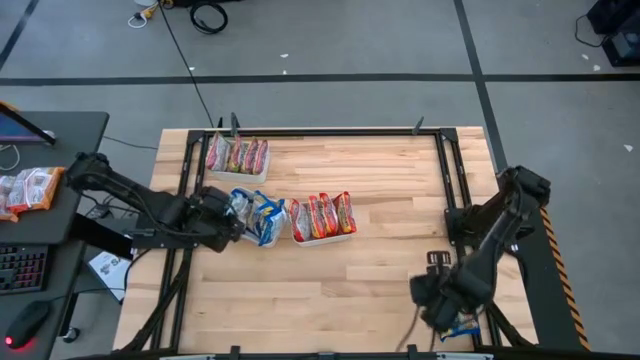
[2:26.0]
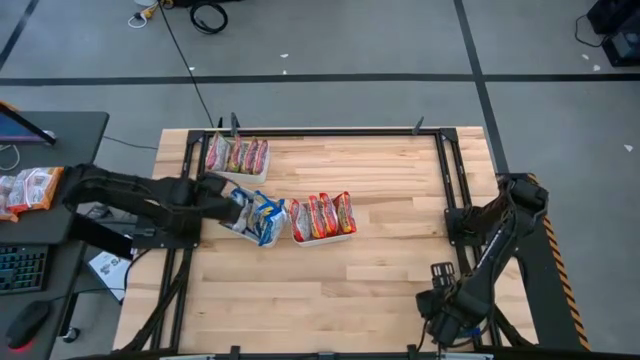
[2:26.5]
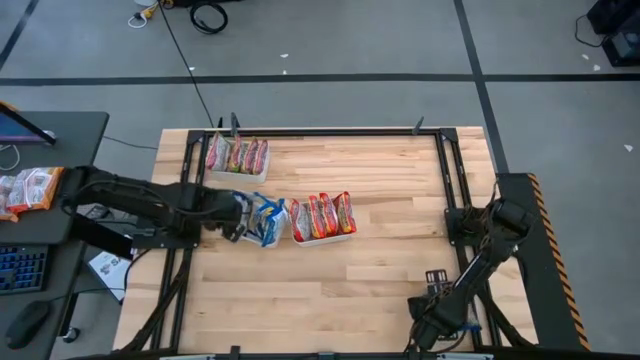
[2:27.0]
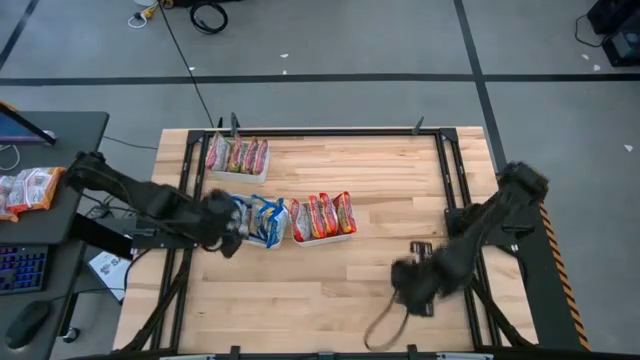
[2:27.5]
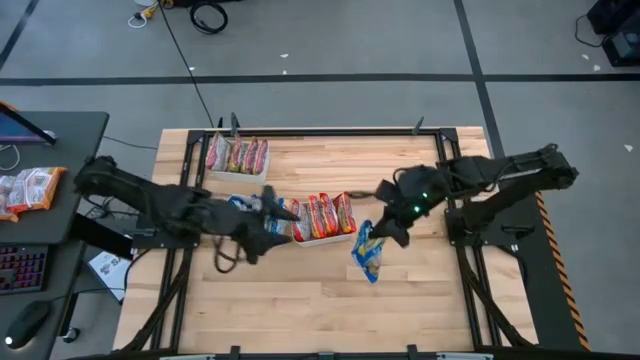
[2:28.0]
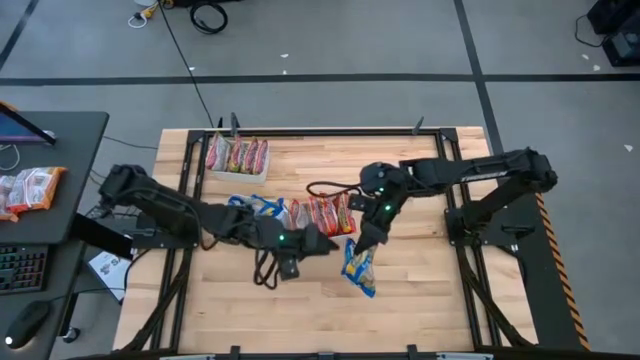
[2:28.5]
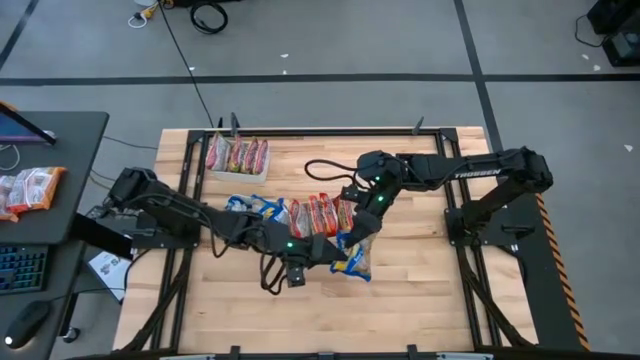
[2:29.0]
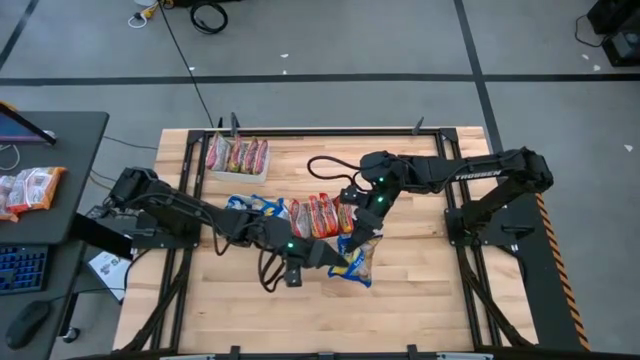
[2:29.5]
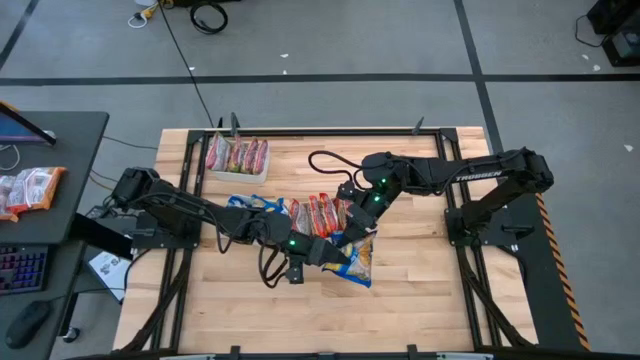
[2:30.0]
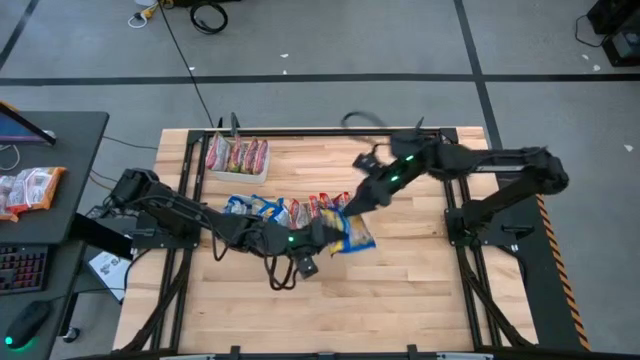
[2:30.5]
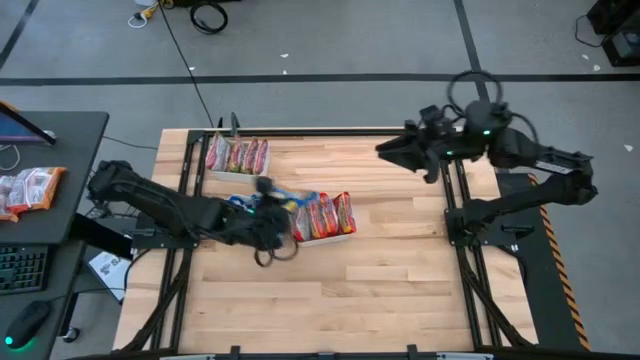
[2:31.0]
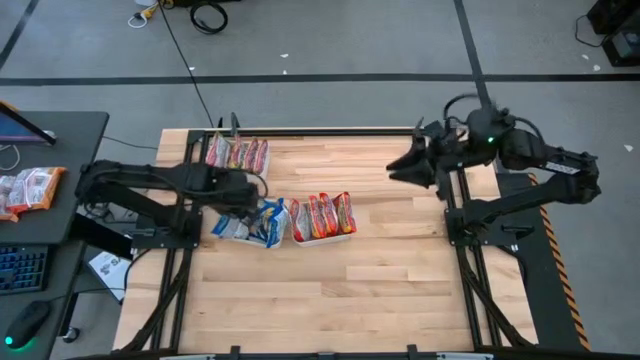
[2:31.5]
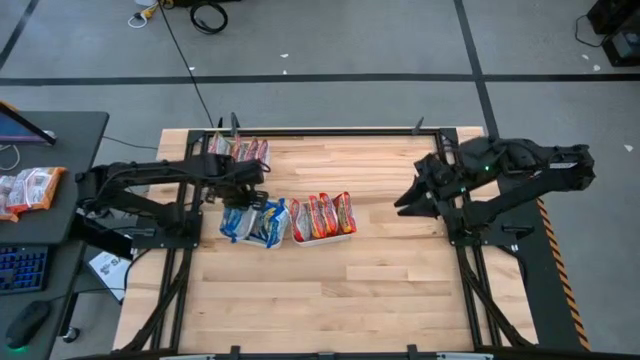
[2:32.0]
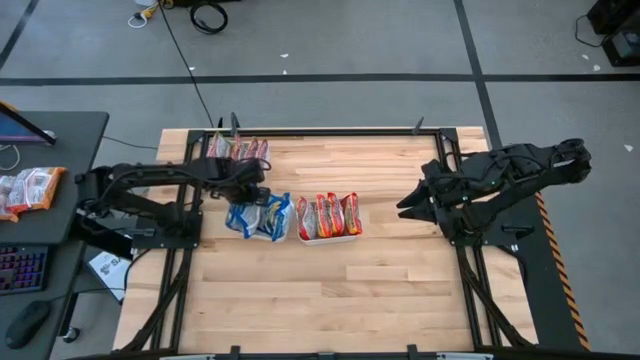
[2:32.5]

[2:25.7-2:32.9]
Task: Sort Maruchan noodles
Put the blue noodle pack into the bottom white bin

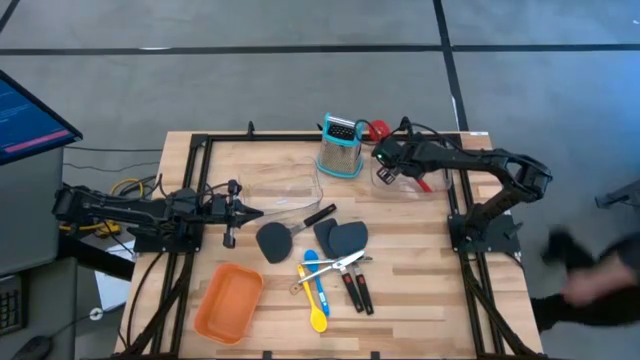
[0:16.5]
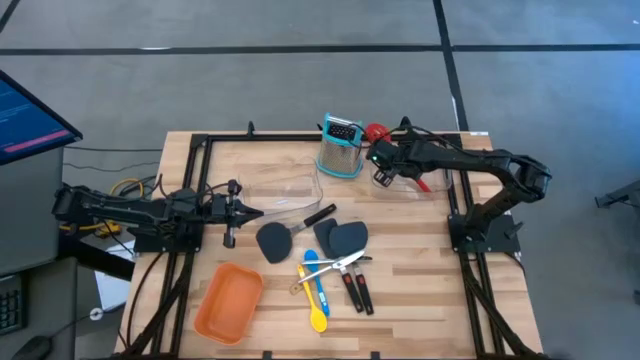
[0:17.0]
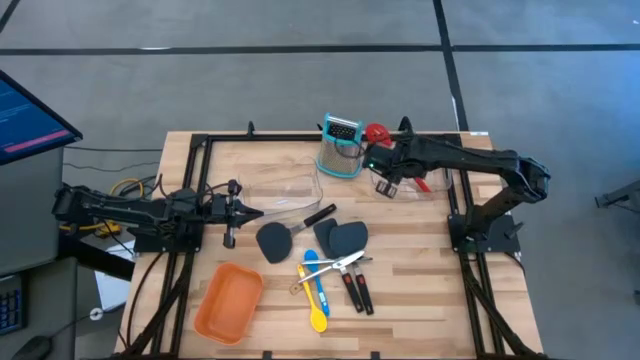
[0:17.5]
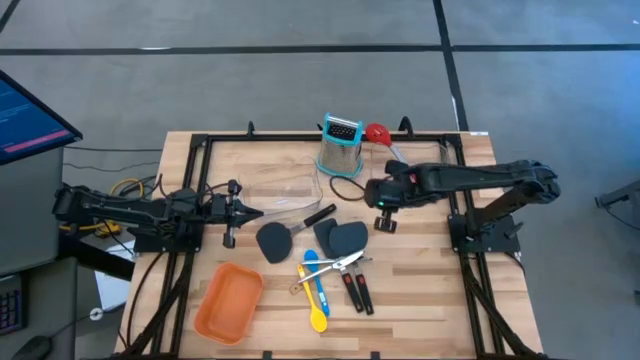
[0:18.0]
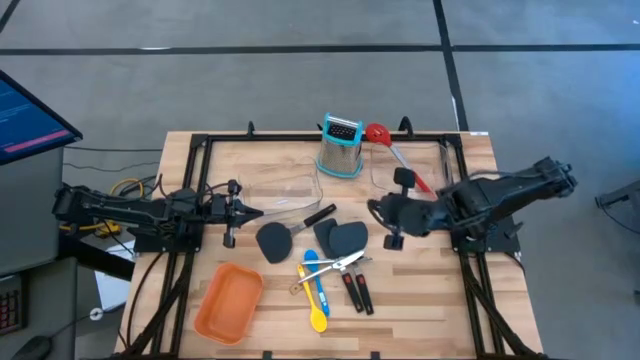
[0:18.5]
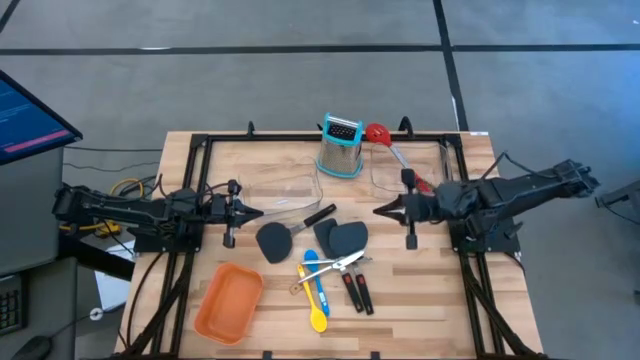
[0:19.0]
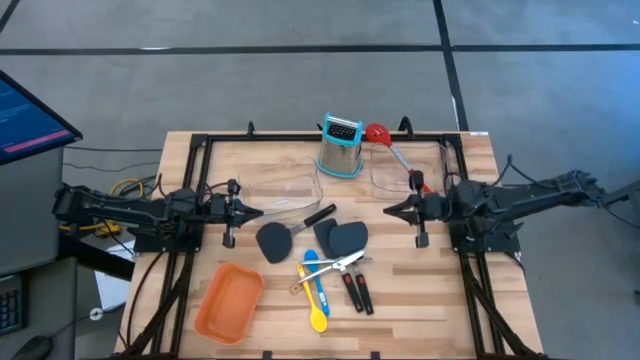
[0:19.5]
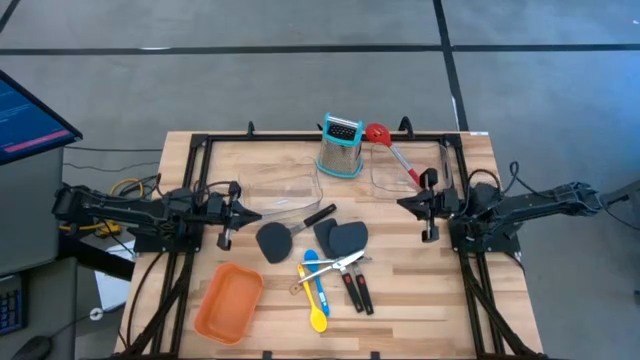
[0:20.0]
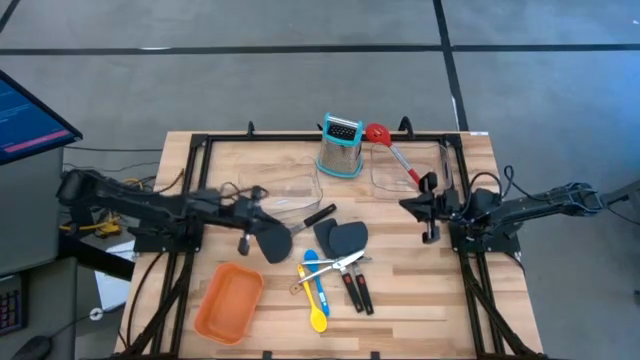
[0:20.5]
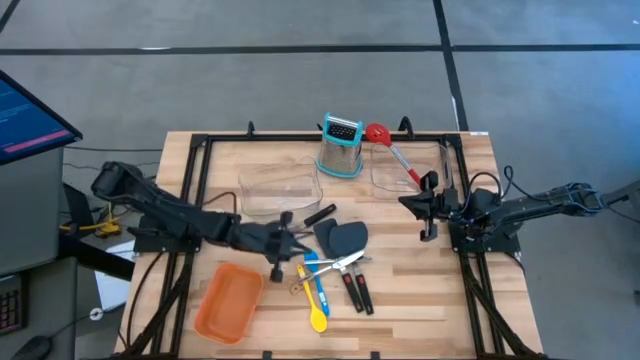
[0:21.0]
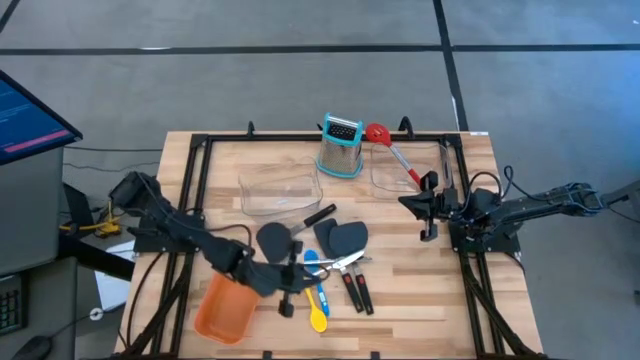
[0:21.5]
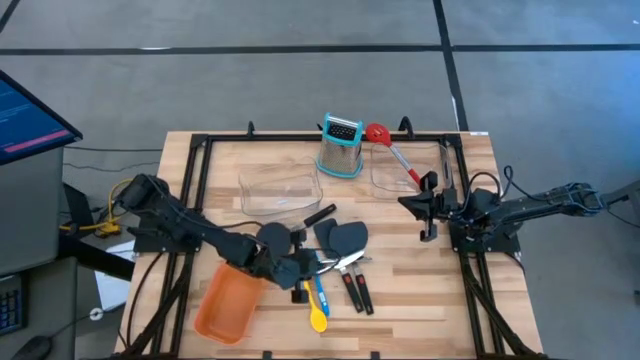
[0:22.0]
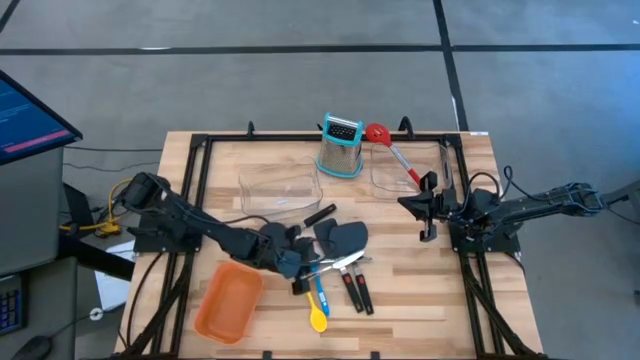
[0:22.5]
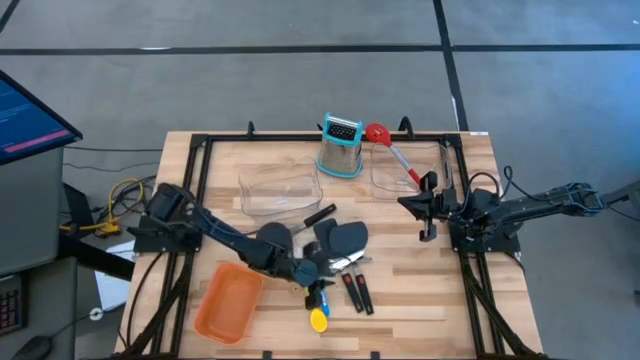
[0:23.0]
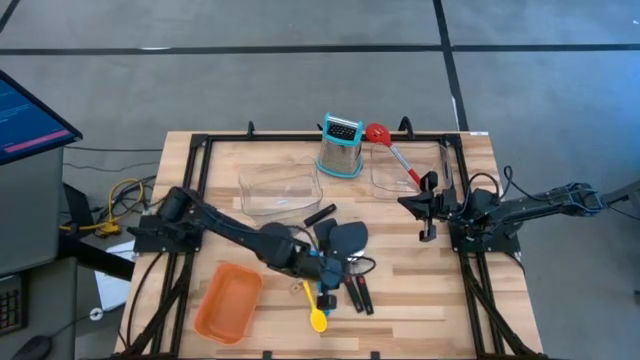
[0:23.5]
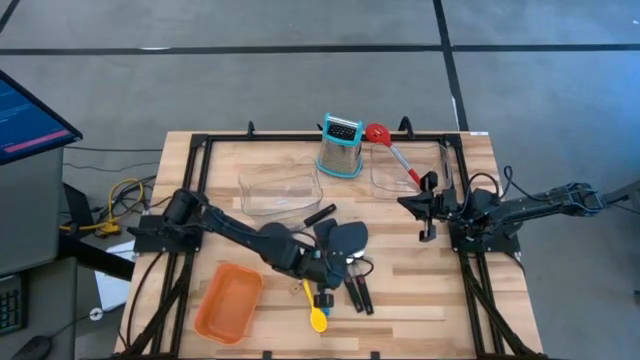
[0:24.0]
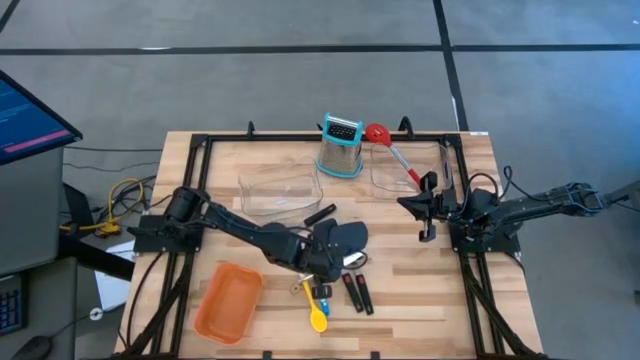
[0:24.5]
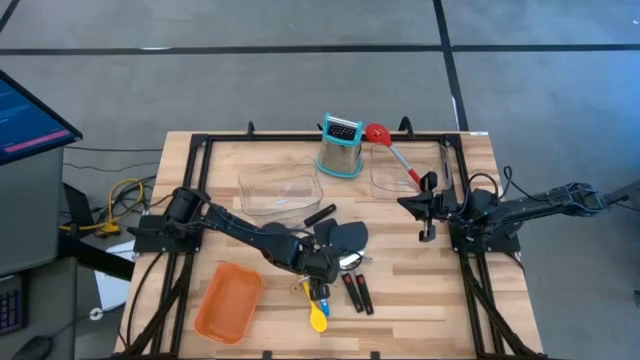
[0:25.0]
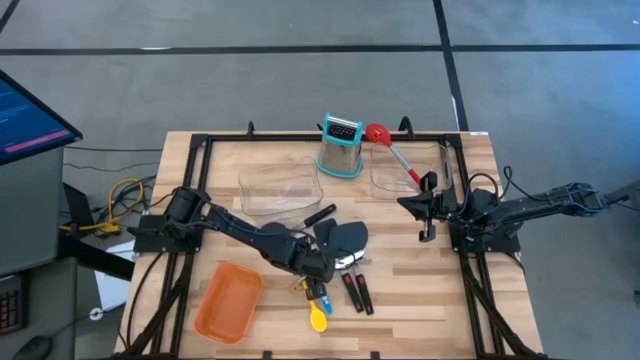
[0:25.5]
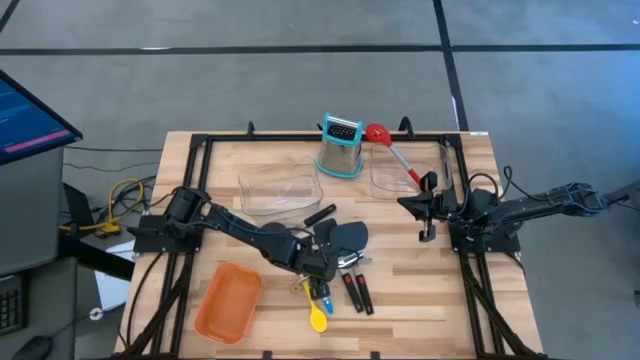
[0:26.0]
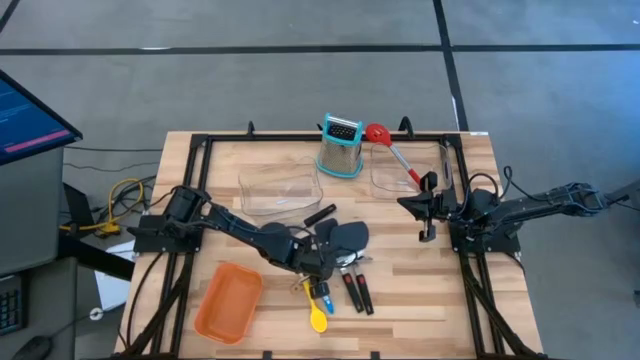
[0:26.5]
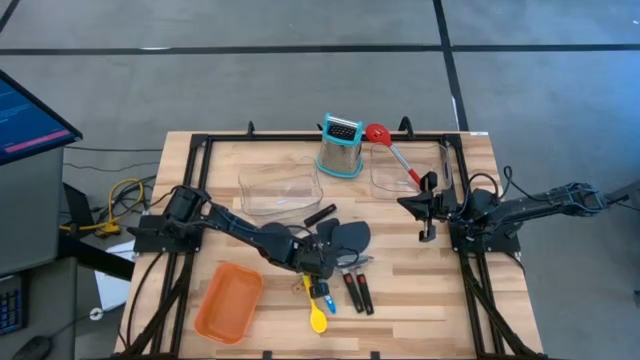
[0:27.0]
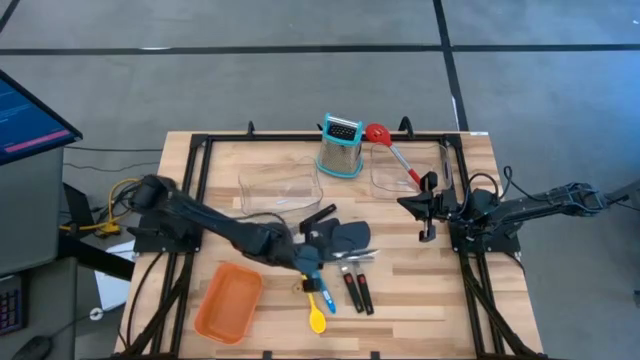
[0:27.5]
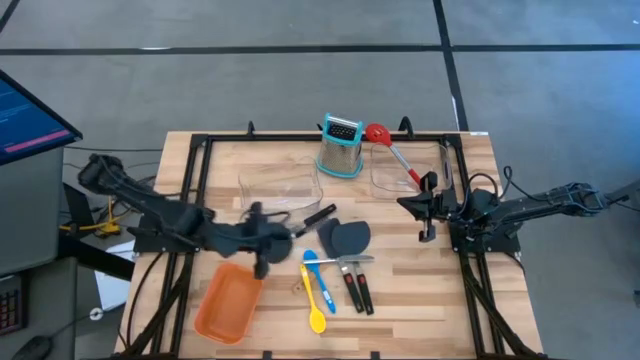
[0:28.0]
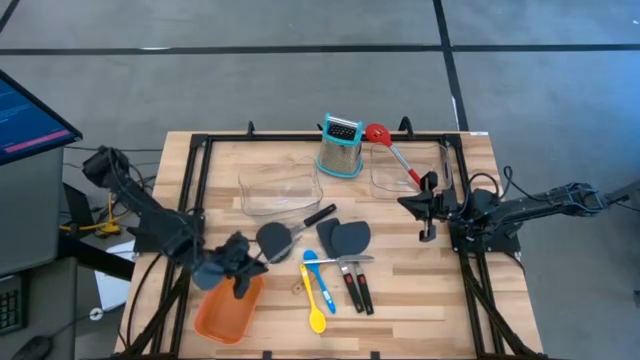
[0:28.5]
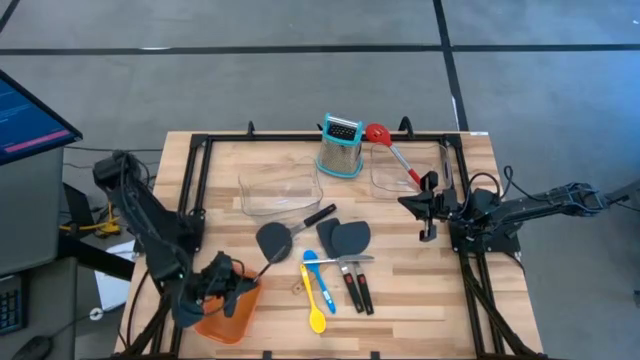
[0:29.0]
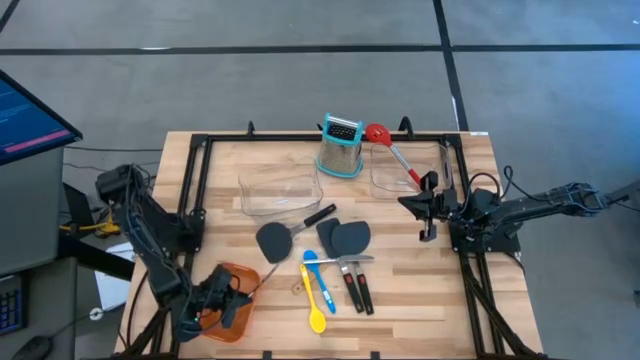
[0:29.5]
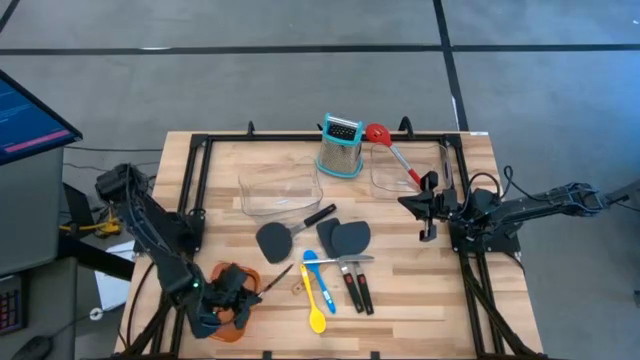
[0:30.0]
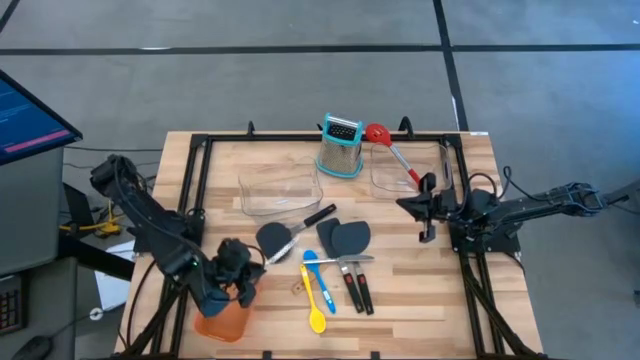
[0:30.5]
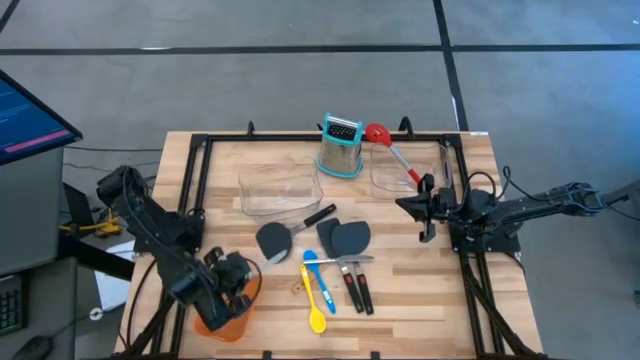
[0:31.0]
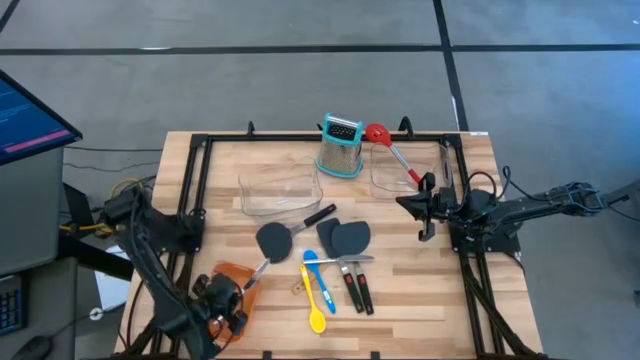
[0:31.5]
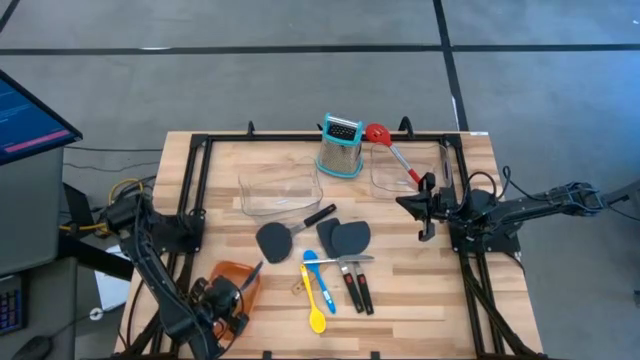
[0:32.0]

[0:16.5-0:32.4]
Task: Pick & Place Kitchen Items
Put the bottom silver table knife into the orange bin
